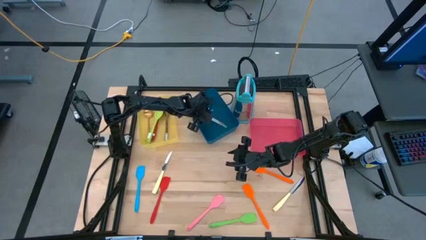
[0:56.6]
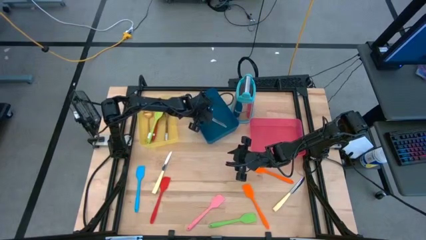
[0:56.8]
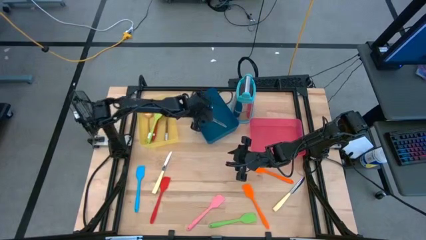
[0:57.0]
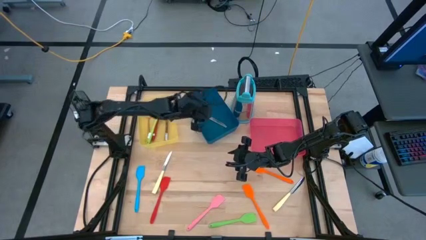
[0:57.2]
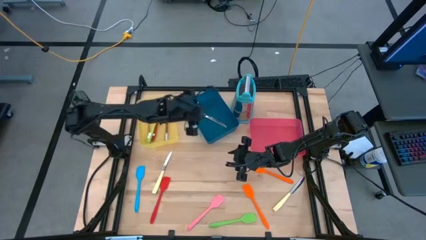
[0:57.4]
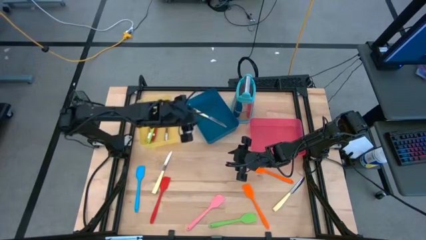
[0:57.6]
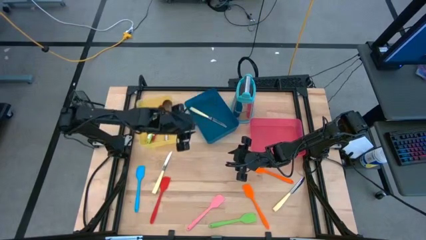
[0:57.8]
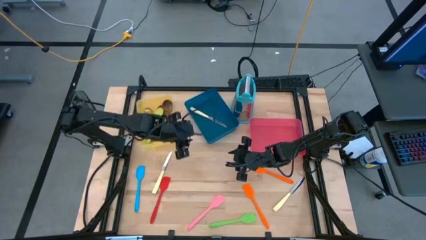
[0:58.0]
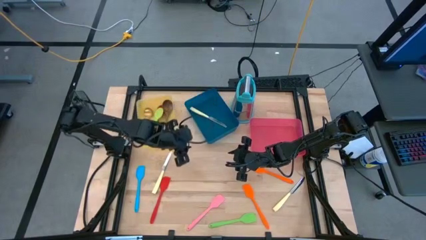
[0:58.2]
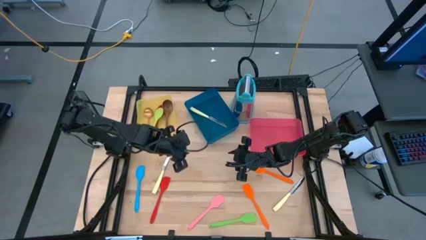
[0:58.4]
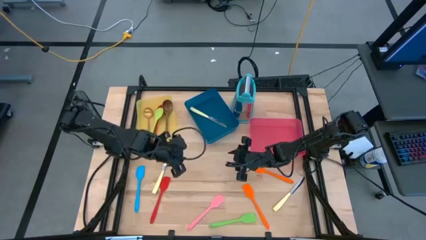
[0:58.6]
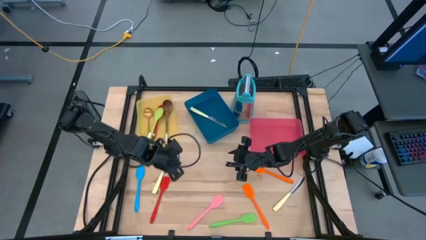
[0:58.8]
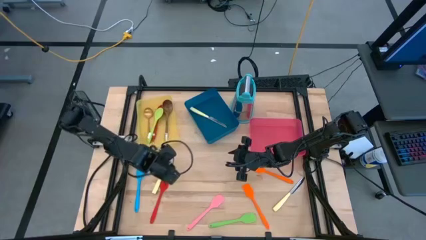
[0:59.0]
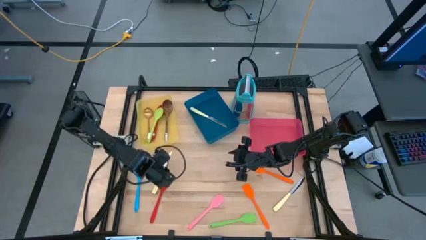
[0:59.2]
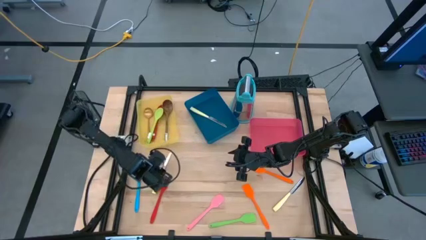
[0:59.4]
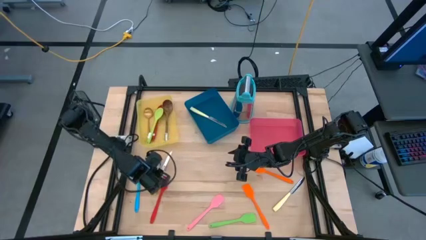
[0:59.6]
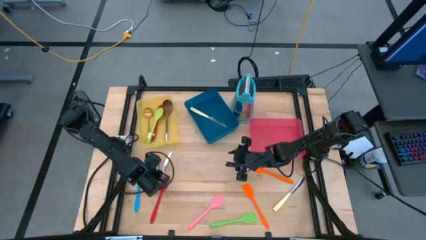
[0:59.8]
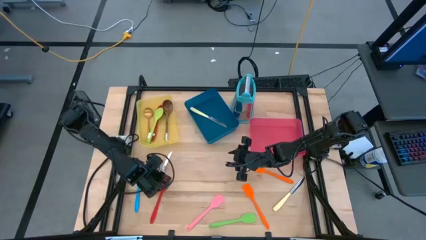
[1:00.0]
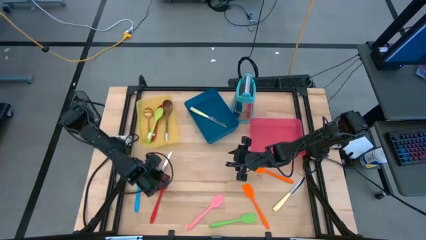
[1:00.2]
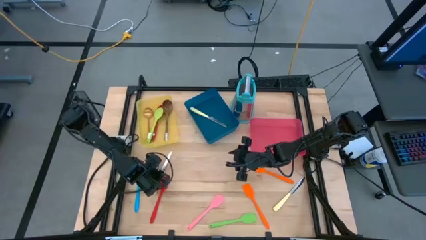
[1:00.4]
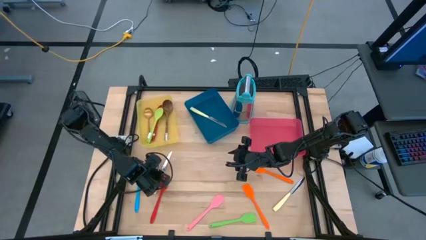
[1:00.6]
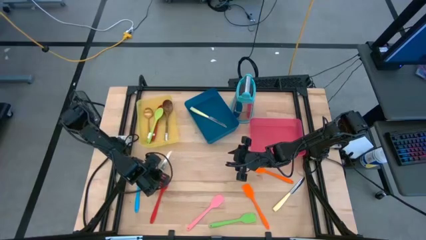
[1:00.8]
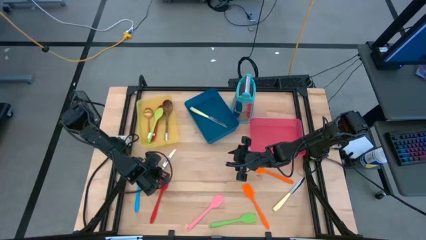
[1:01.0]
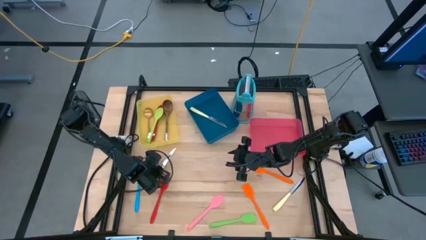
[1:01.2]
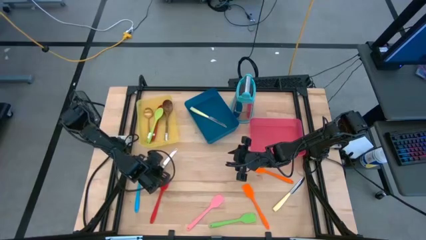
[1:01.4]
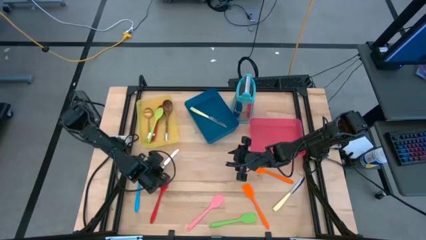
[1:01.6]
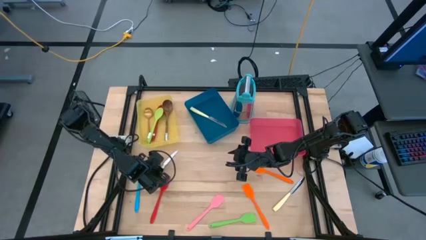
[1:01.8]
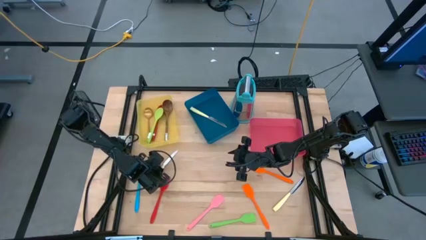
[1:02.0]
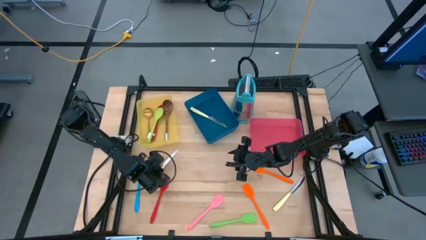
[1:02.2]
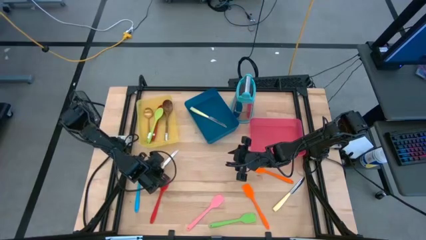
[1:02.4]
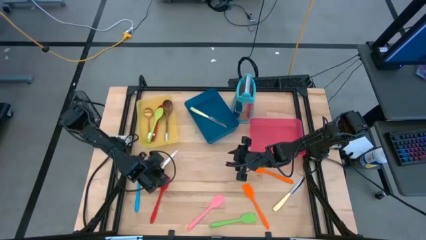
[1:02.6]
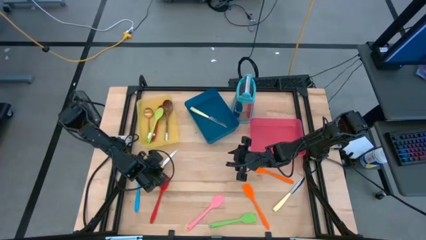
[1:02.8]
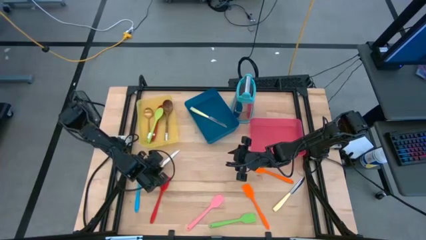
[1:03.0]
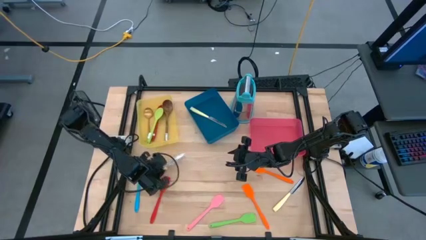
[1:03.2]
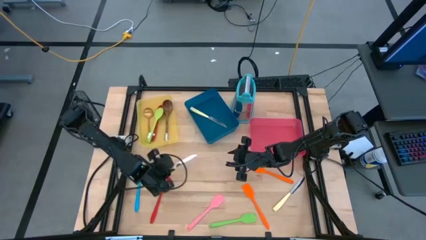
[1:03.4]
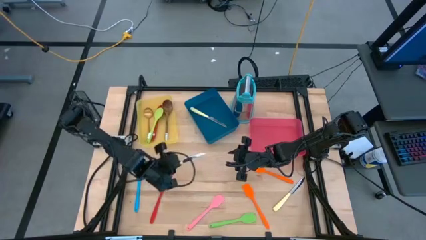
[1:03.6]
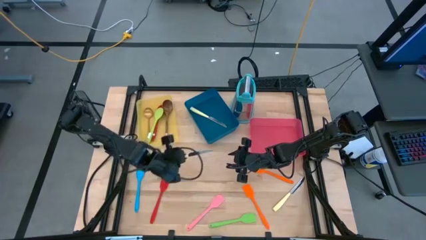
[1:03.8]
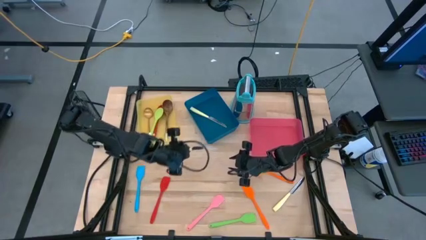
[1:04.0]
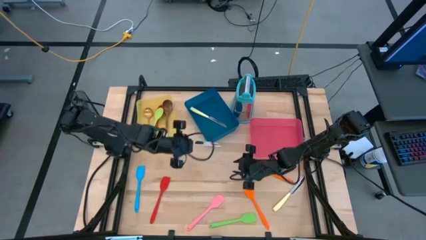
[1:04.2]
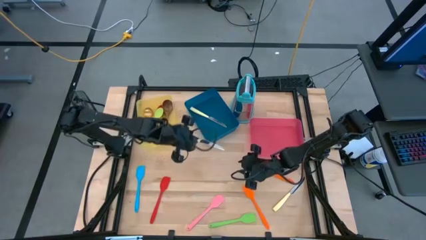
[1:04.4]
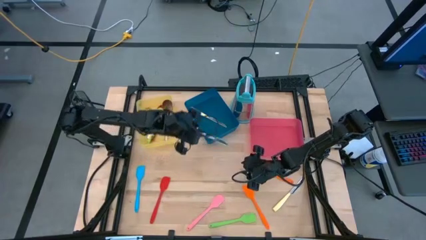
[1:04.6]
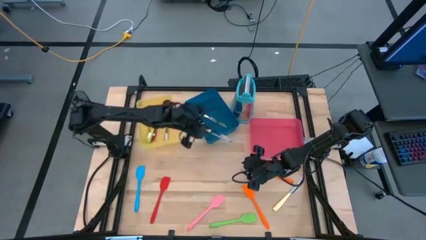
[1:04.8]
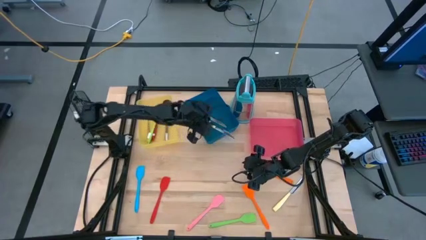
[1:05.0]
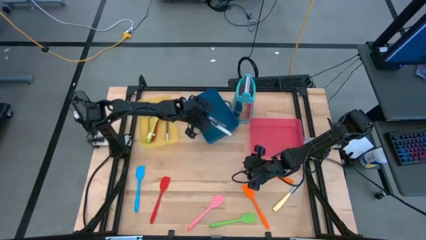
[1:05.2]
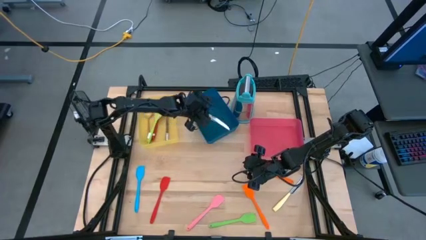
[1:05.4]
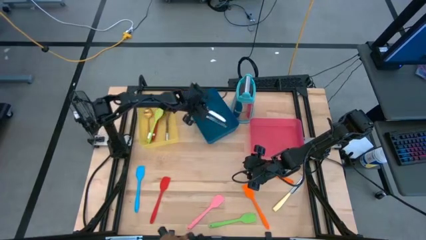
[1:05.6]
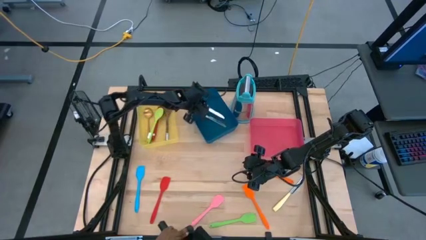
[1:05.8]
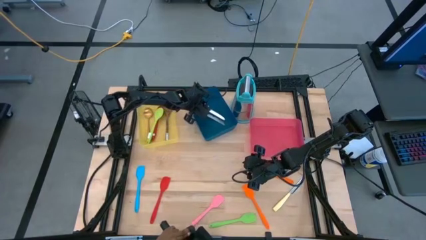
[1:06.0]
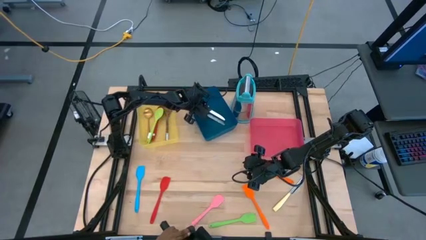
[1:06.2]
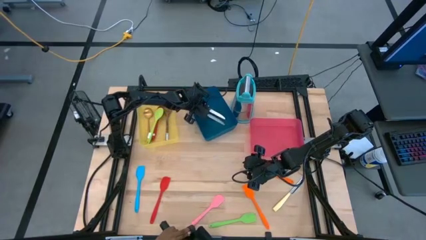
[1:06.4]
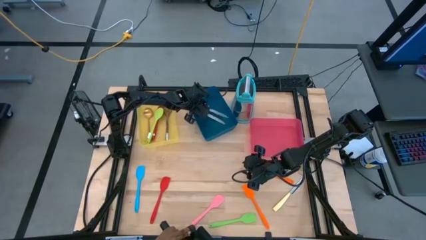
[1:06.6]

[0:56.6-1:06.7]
Task: Pick & Place Kitchen Items
Put the left yellow knife into the blue bin

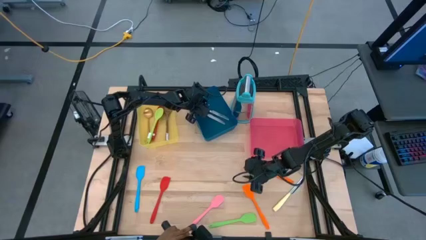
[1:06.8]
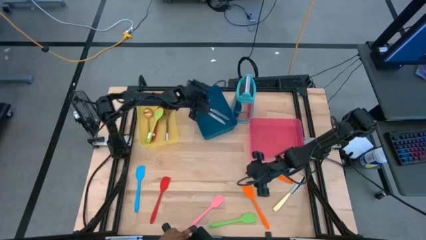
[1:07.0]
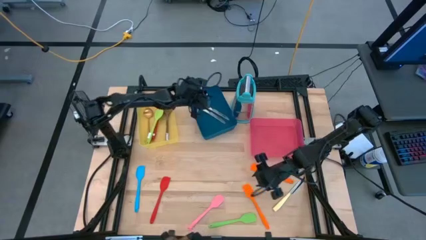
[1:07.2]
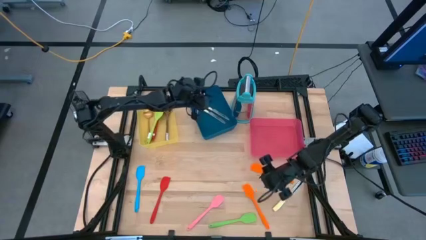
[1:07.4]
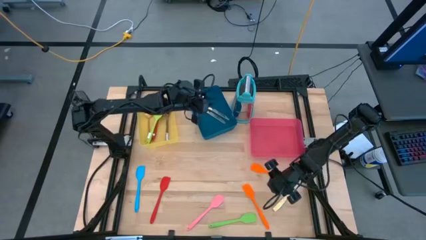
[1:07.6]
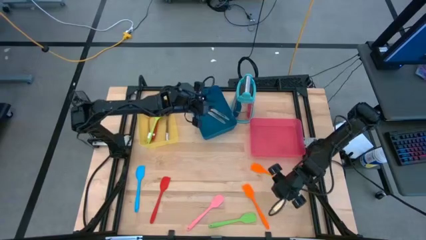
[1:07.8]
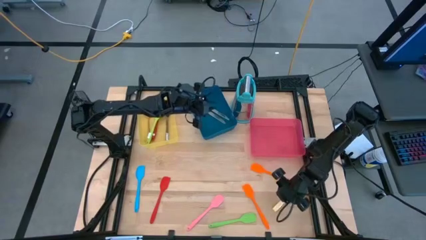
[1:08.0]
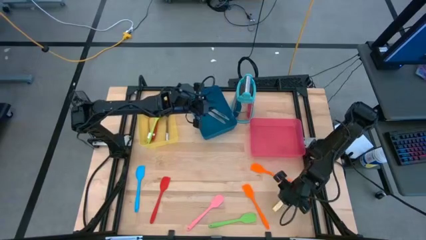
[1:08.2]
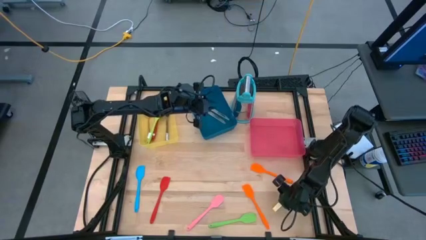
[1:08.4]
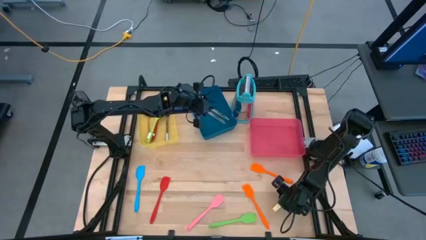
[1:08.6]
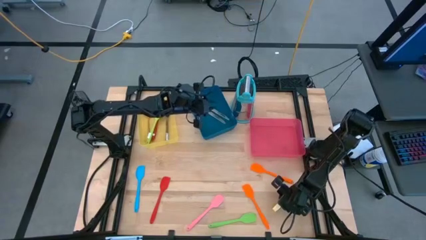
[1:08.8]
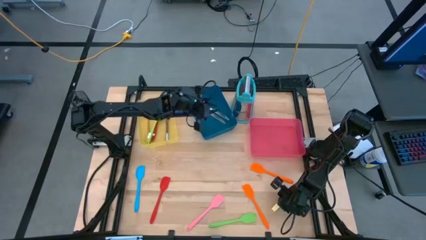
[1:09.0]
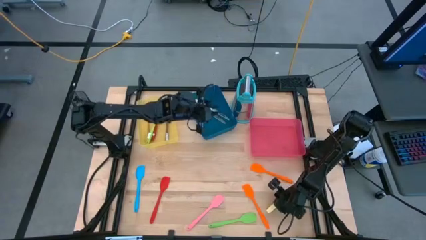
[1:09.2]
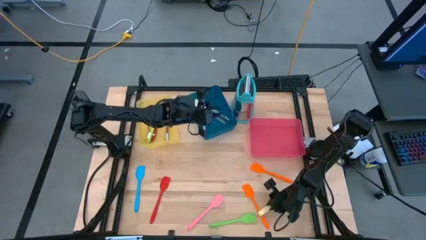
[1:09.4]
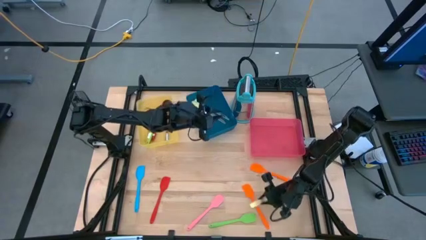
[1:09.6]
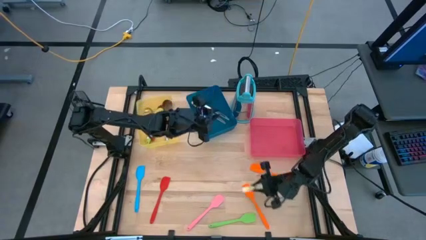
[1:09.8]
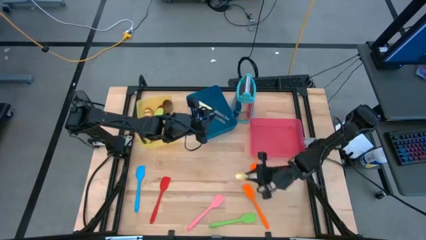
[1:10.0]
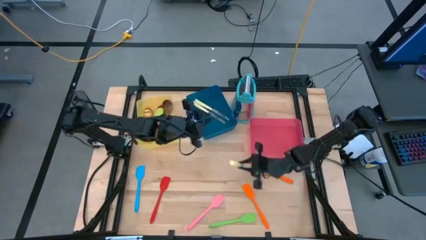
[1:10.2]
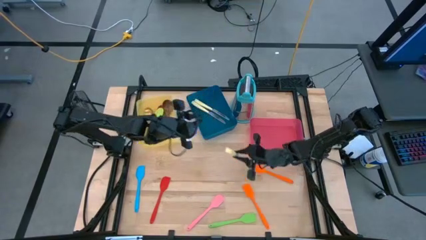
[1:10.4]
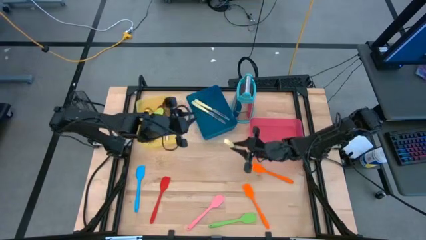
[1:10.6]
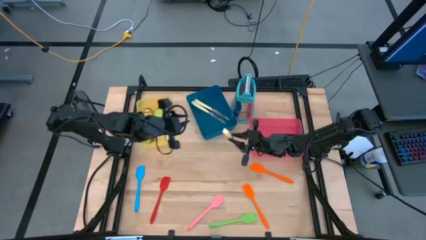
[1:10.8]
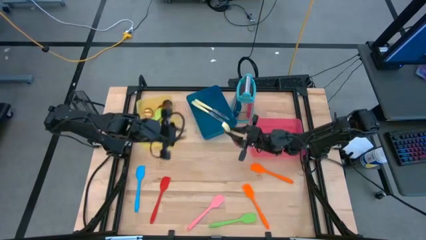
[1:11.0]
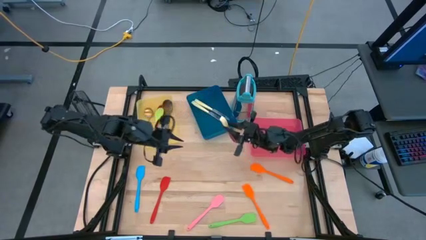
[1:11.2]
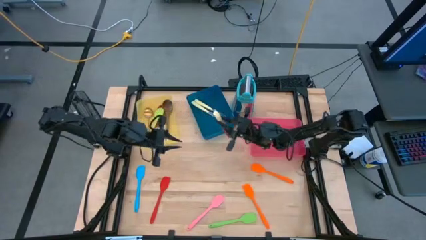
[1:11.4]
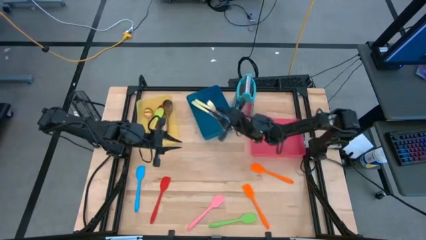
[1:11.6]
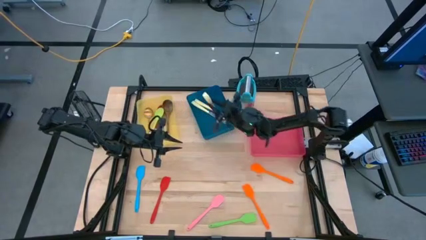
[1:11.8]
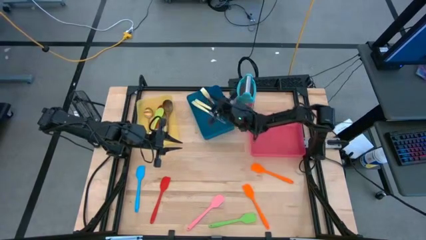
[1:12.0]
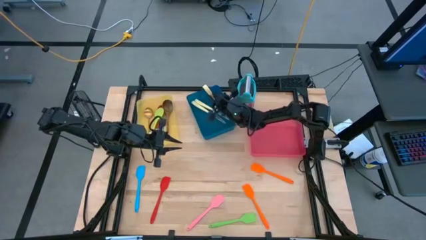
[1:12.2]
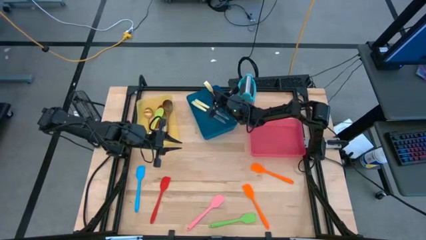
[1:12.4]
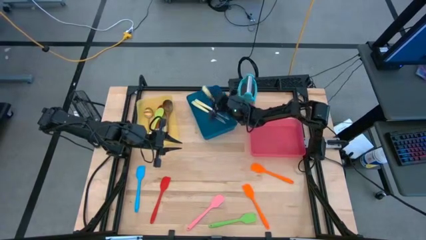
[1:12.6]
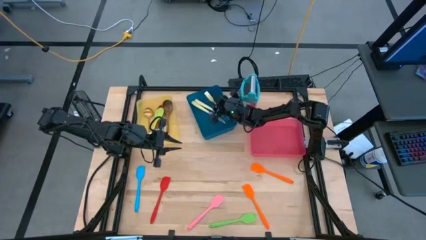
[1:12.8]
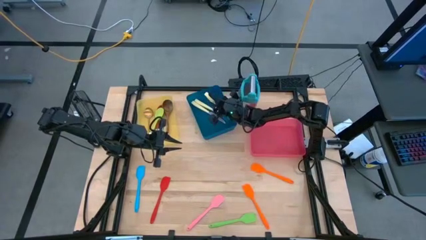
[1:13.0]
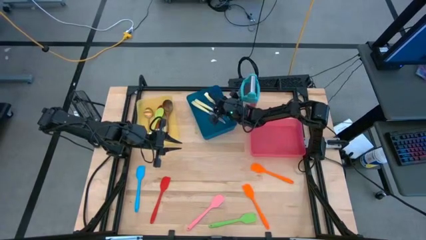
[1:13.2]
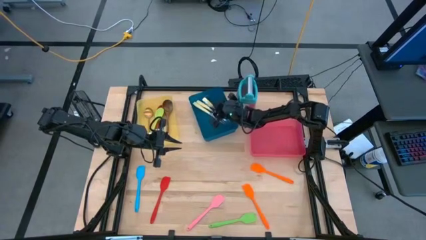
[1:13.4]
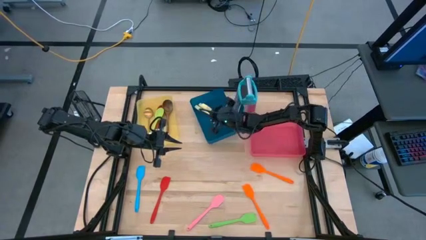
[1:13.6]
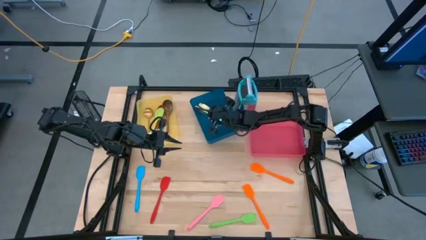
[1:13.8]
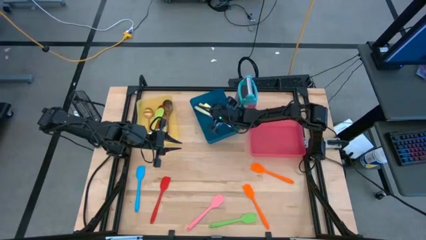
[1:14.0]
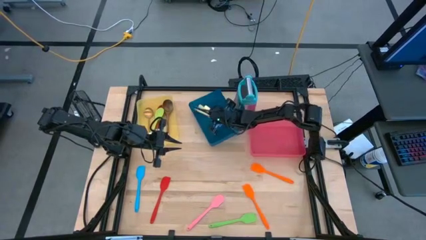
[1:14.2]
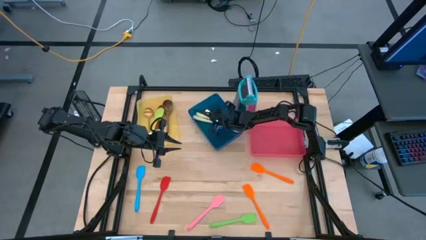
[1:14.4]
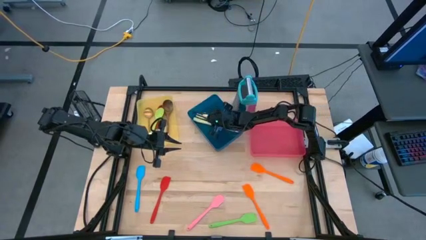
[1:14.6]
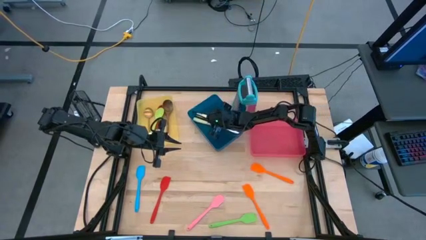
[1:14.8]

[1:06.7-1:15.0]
Put the yellow knife into the blue bin
